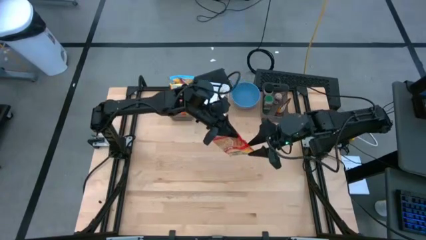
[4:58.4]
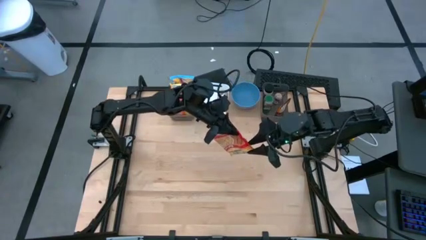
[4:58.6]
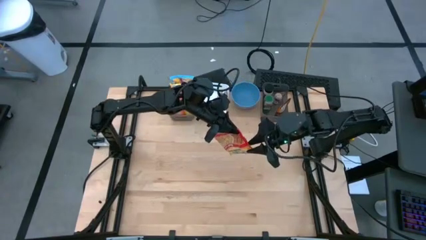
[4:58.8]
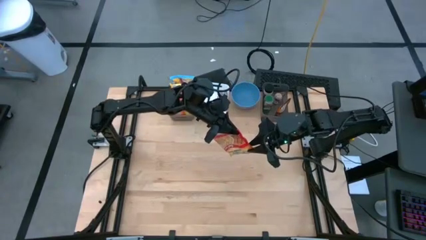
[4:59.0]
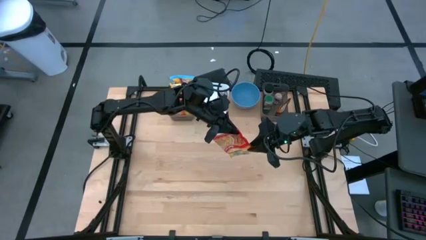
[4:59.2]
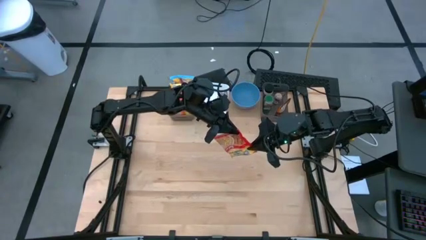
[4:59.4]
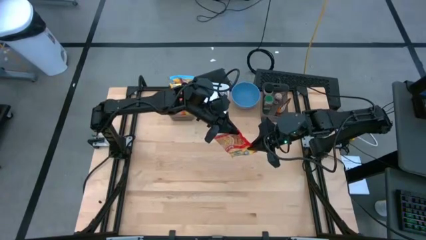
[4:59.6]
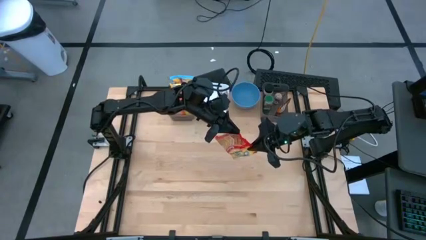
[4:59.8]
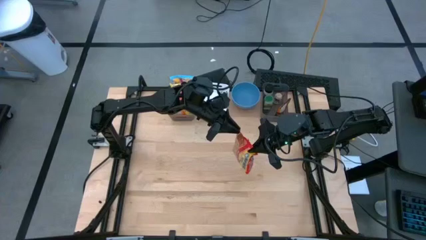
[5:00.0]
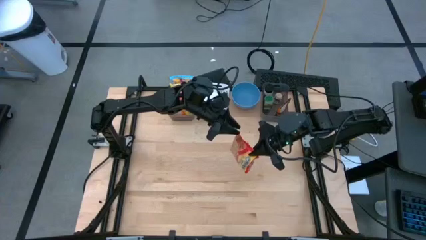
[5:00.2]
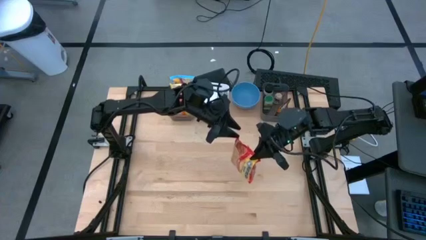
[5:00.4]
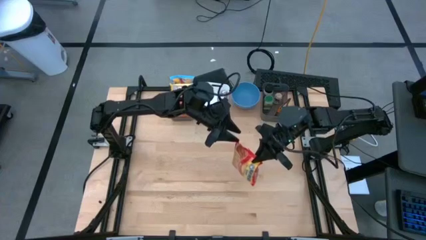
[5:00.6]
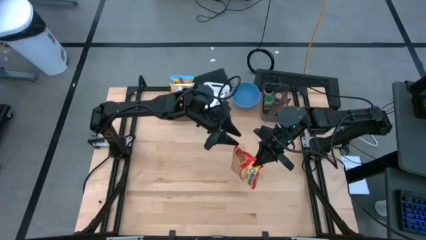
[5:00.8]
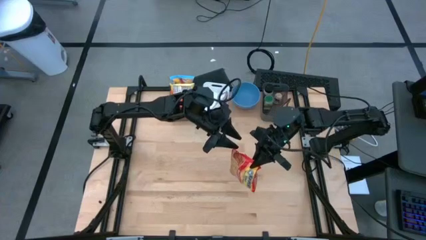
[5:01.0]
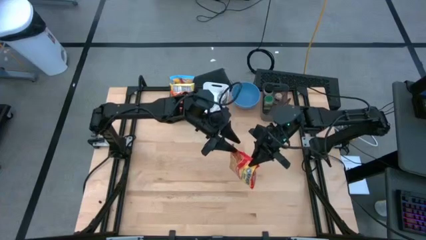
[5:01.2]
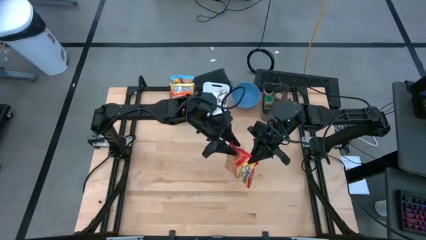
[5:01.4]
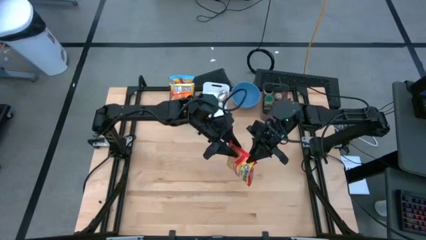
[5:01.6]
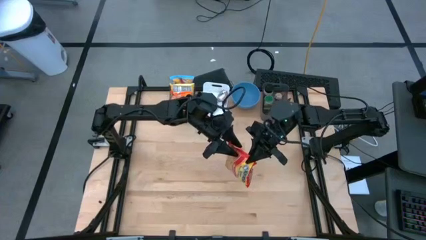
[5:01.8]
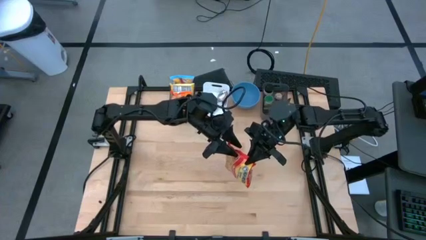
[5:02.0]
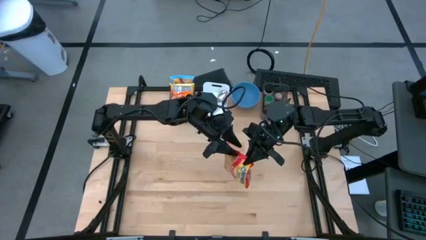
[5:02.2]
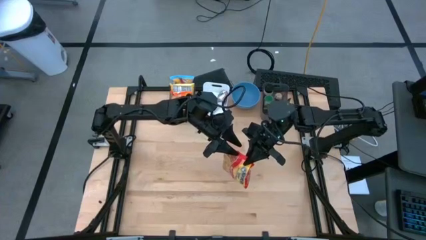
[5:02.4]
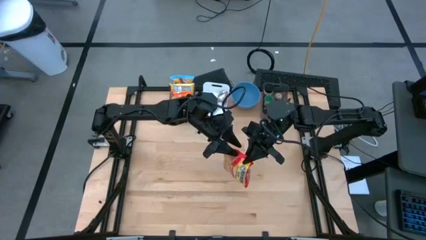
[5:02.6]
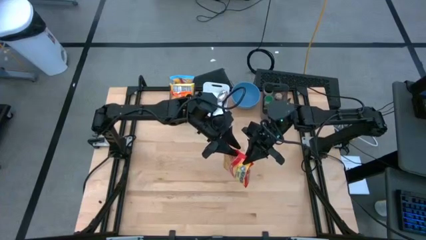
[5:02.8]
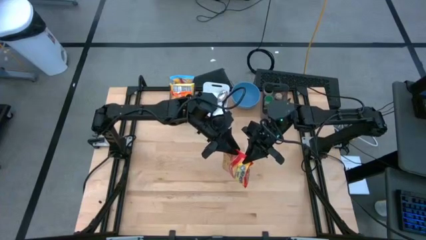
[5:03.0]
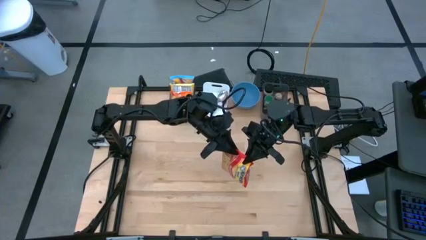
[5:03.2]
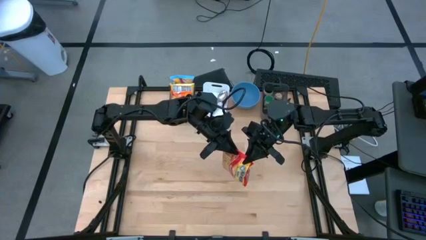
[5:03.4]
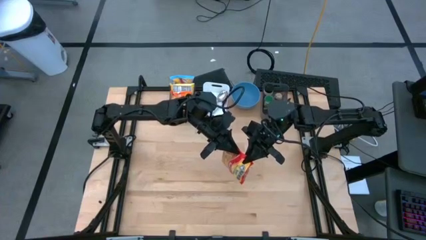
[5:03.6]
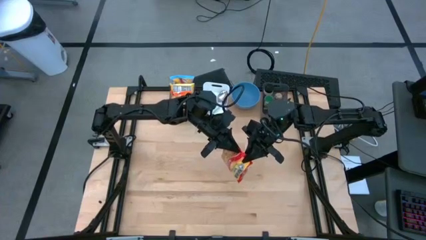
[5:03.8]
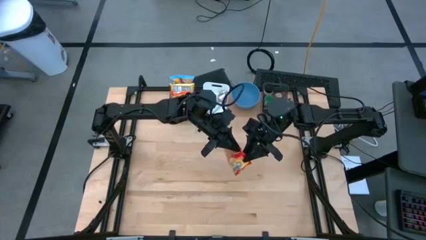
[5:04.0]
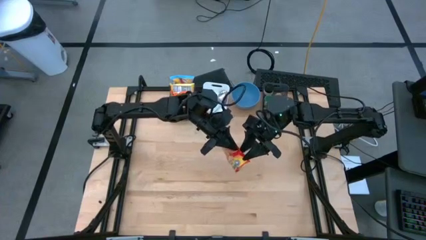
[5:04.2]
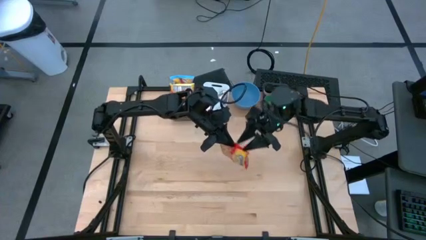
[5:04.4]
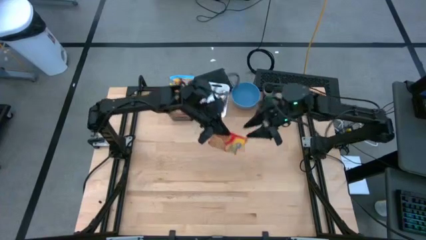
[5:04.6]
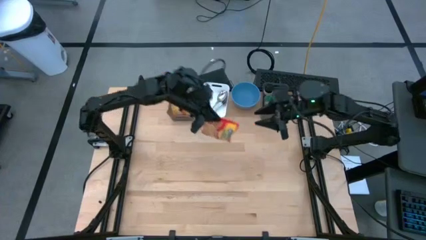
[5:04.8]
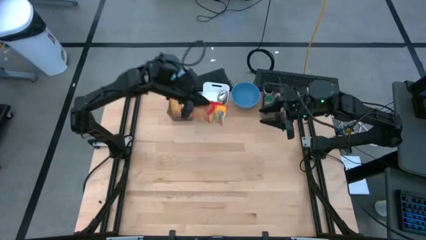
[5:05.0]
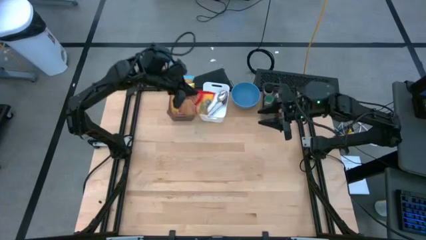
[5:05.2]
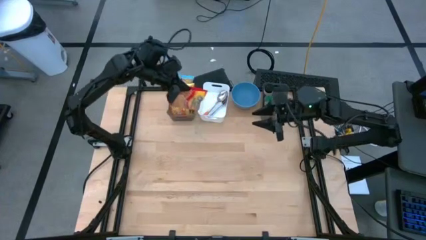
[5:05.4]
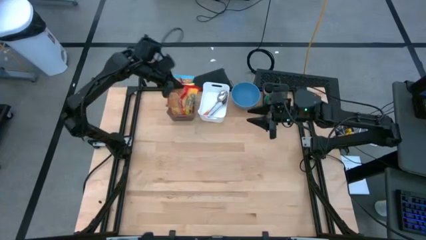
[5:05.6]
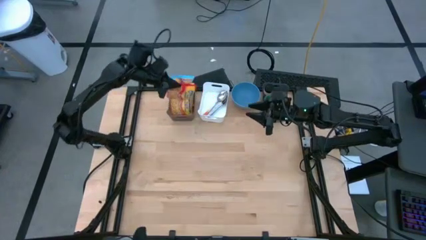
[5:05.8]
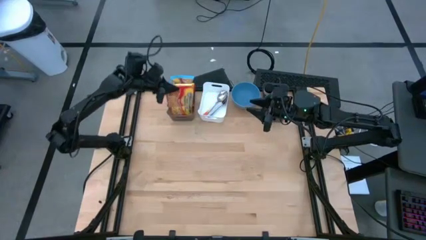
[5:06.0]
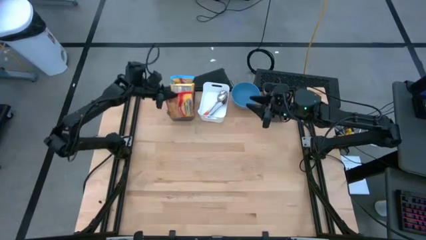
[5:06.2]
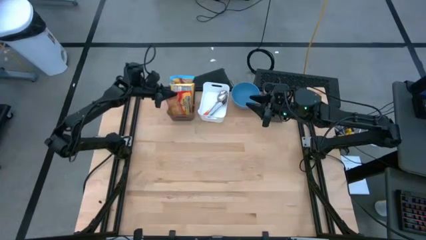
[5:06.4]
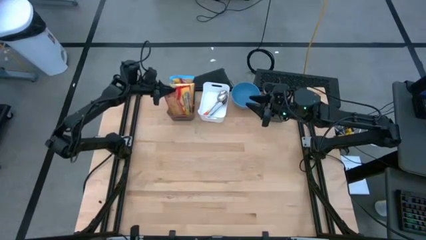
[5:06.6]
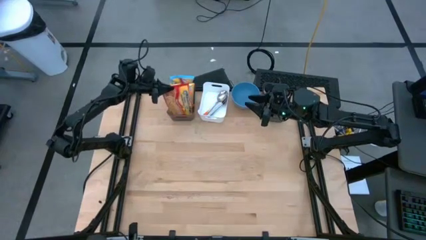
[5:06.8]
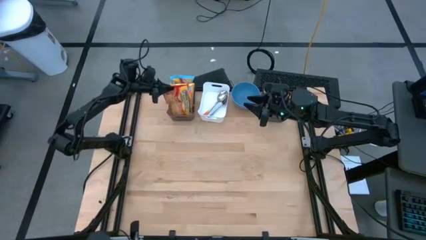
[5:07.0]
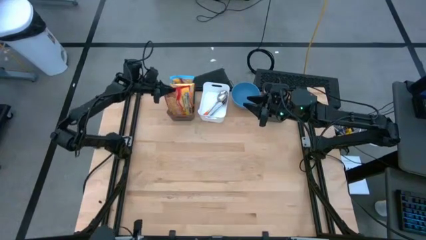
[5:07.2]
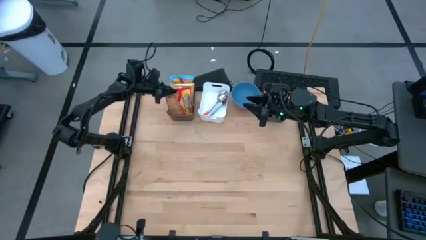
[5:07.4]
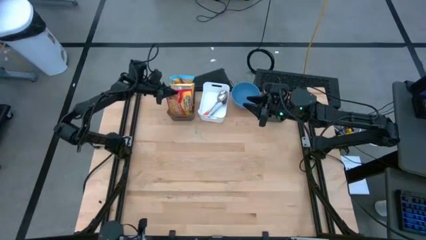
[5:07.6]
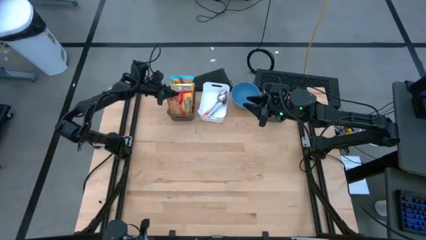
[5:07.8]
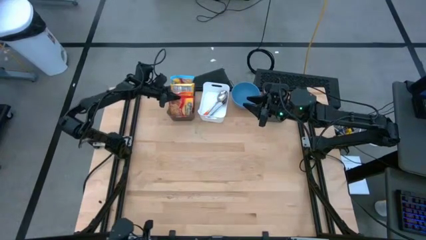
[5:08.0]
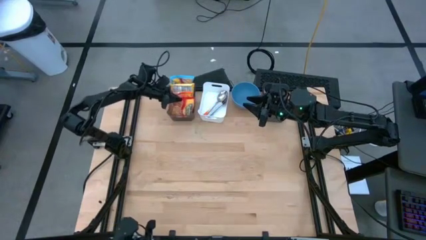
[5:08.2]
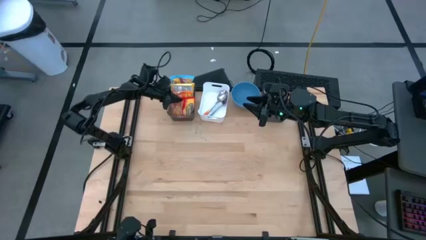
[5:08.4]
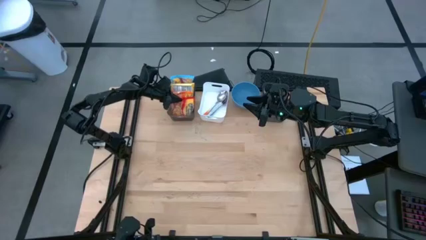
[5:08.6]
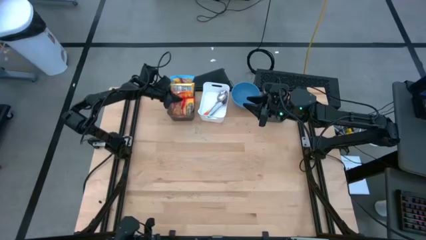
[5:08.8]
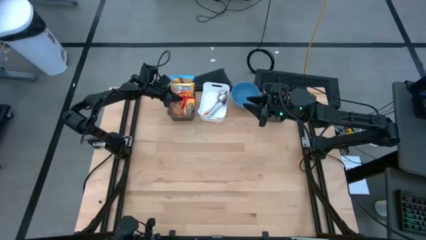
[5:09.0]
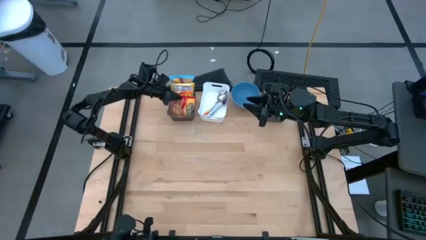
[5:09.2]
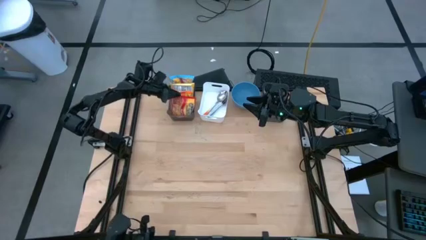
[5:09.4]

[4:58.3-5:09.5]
Task: Pick & Place Food Item
Put the red noodle pack into the left black bin

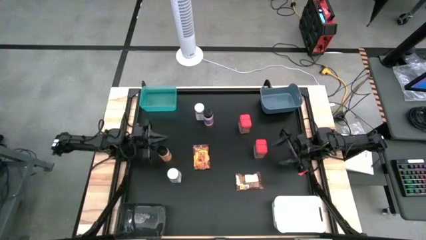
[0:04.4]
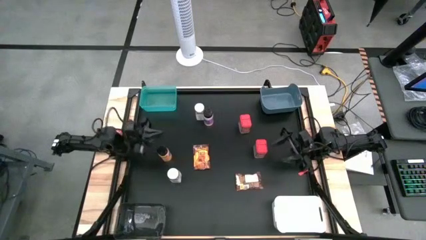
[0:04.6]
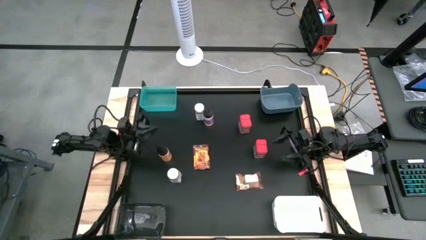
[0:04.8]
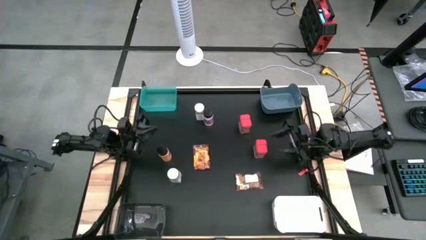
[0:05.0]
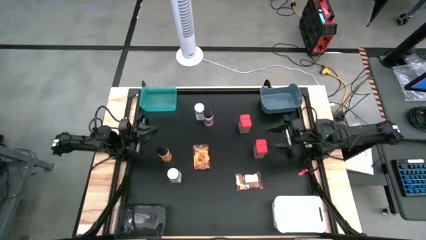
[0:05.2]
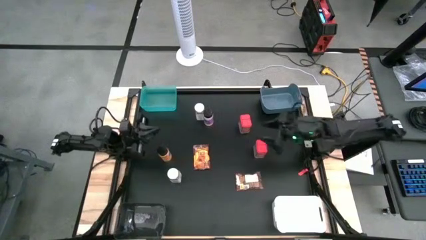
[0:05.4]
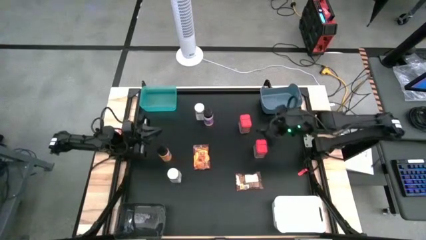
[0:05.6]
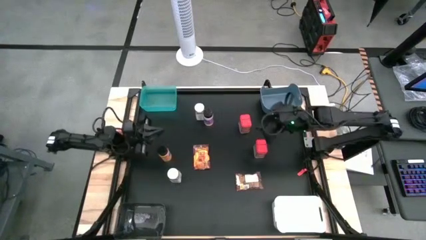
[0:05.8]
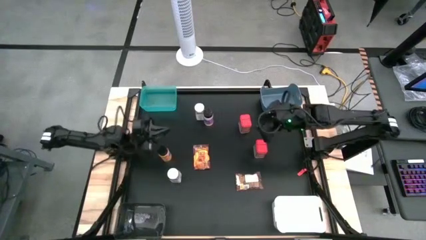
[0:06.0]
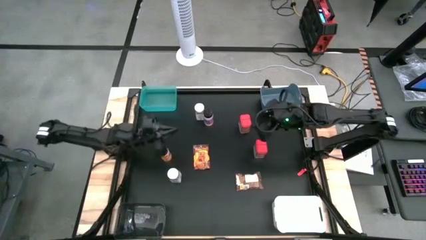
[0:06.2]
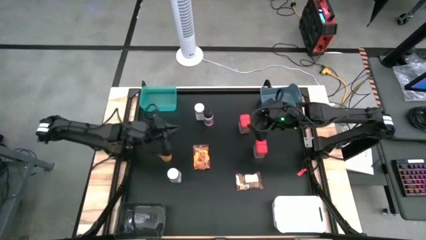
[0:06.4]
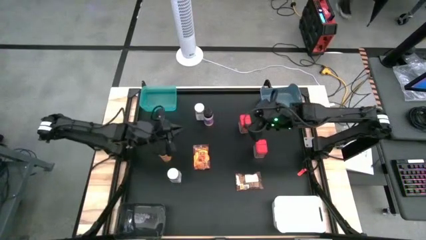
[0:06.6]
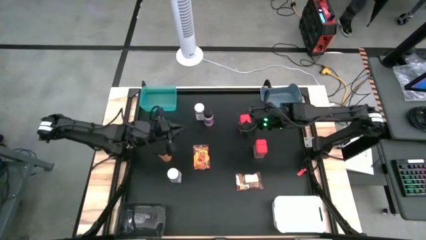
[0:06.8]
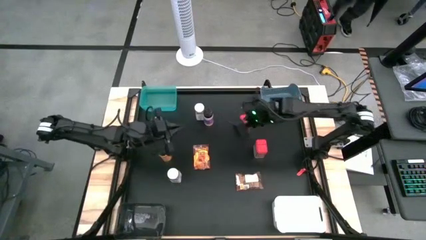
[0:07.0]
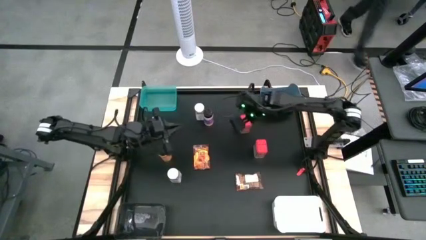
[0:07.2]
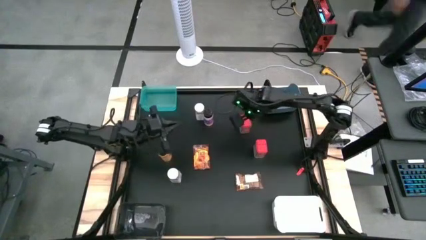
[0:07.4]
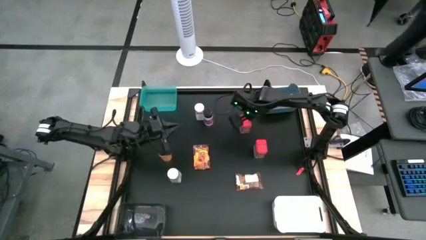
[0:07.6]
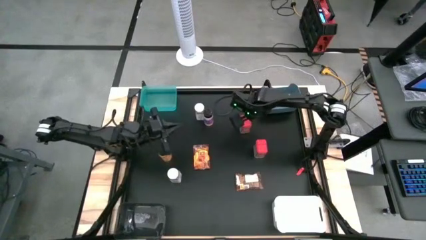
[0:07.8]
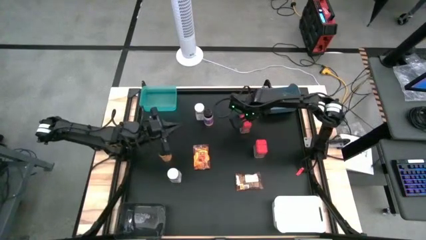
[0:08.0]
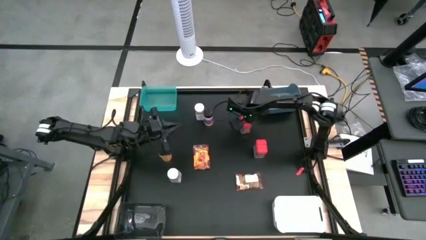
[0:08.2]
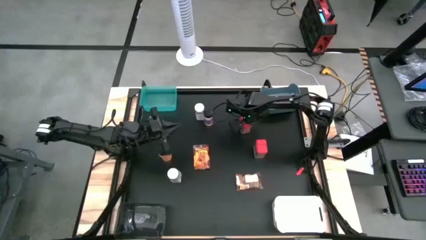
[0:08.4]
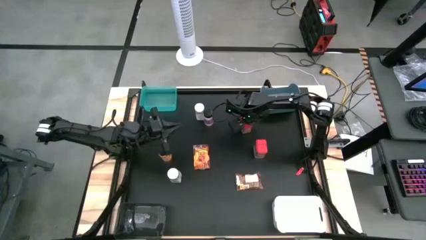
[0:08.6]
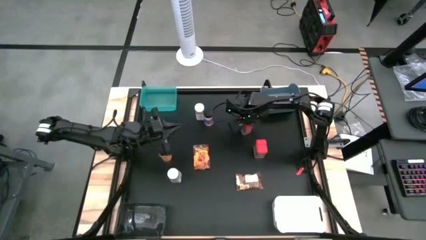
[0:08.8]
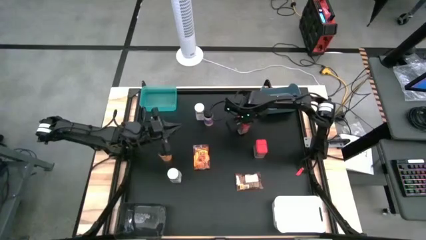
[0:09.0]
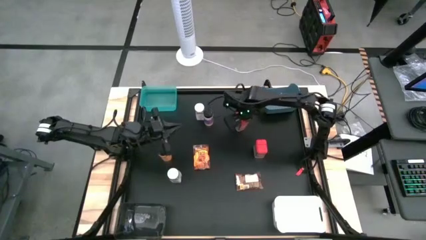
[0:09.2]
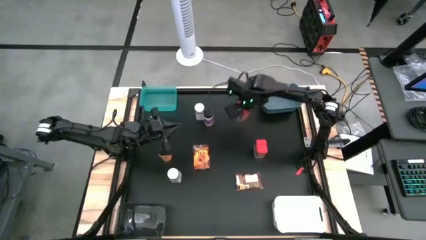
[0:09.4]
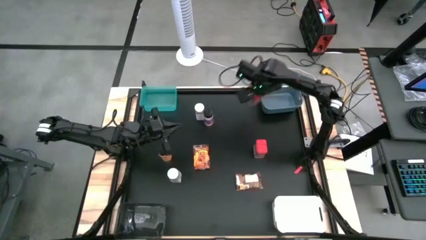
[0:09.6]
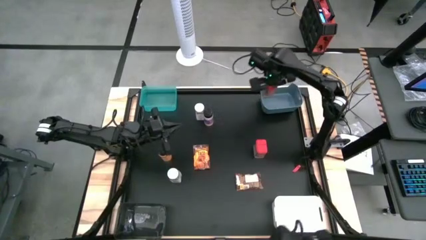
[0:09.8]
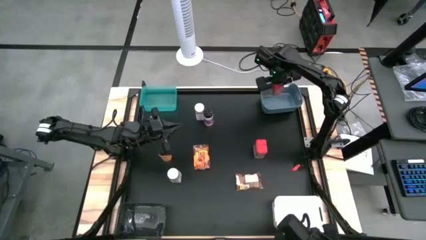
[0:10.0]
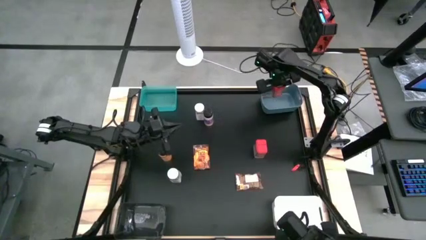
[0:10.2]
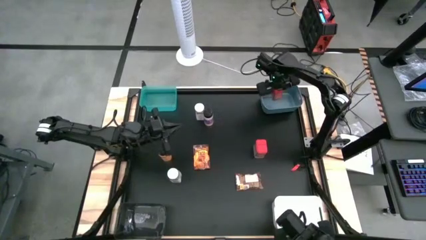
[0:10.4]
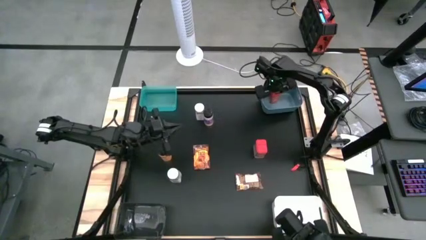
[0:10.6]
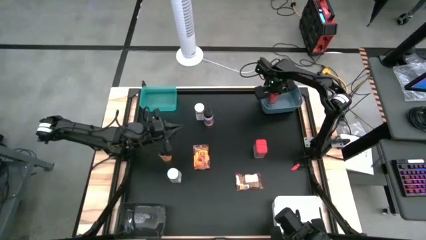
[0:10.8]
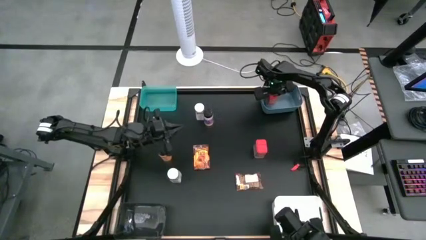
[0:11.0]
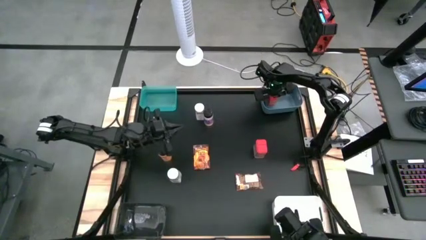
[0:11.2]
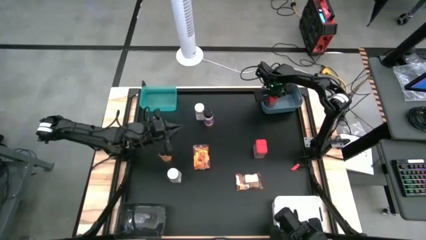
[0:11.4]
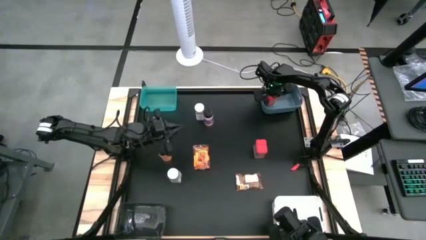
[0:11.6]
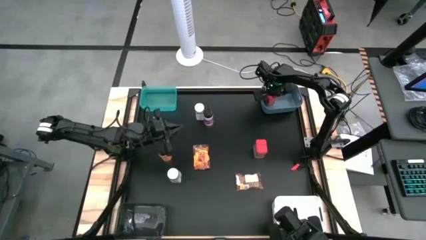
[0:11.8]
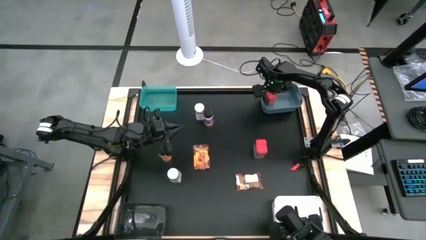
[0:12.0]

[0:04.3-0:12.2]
Task: Sort spices by type
Put the top red seasoning can into the dark blue bin
